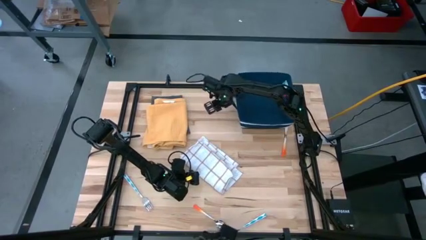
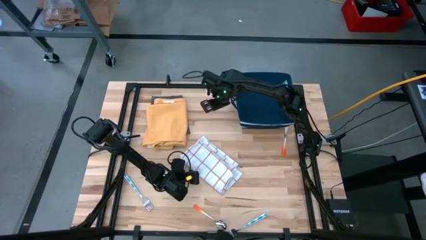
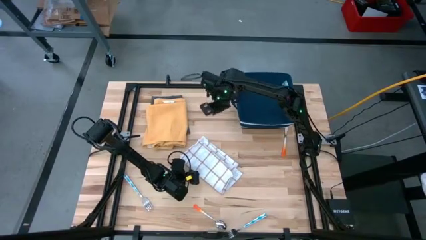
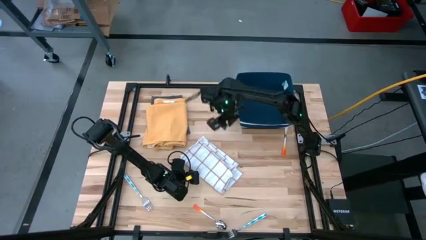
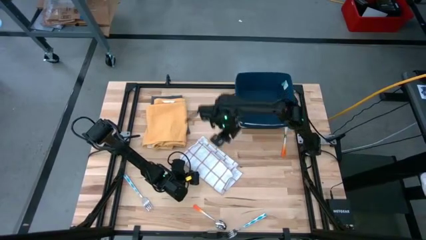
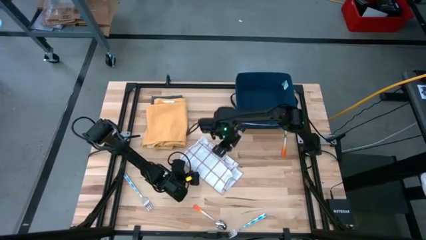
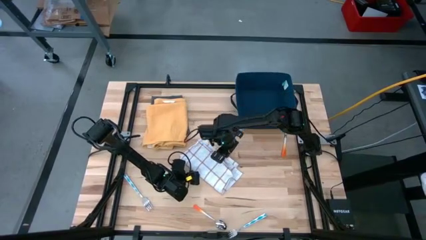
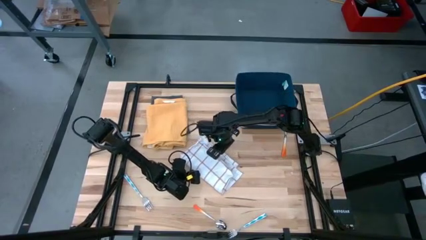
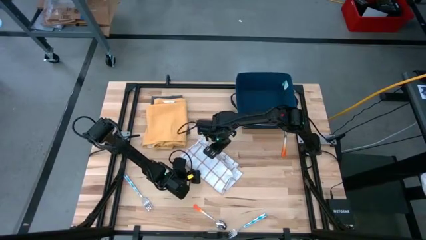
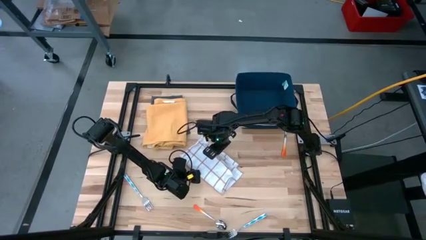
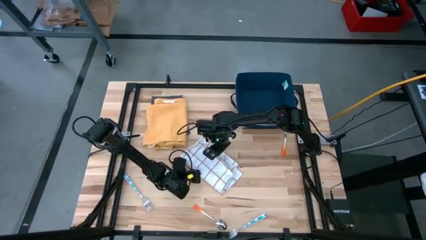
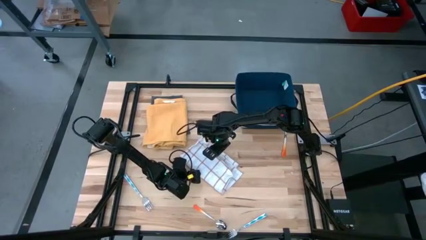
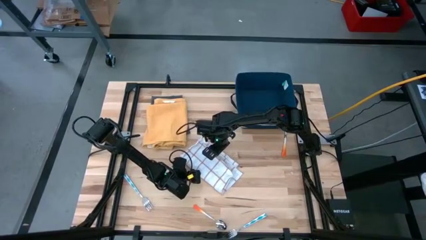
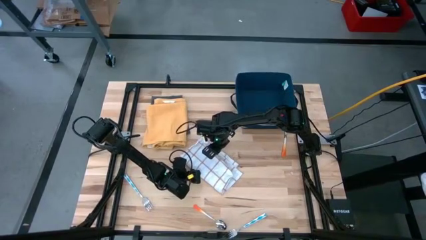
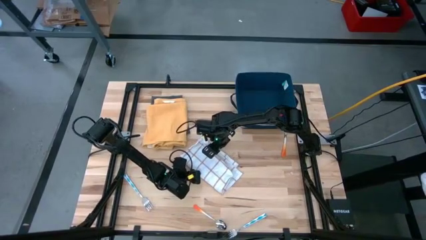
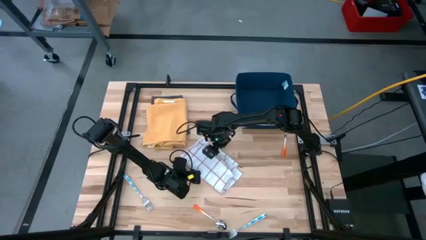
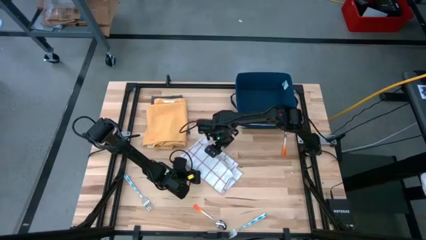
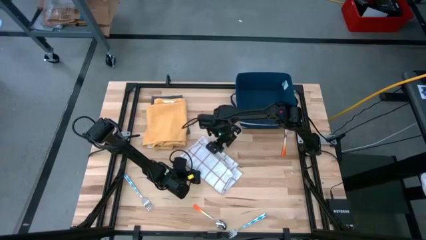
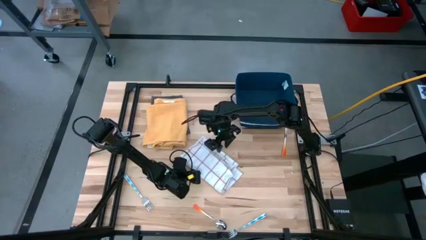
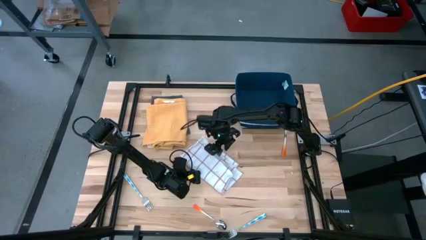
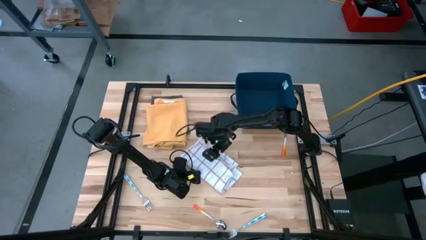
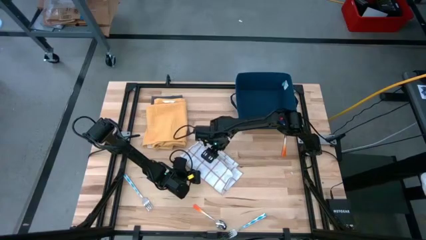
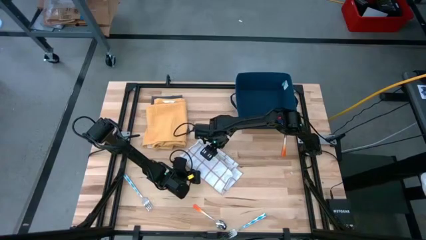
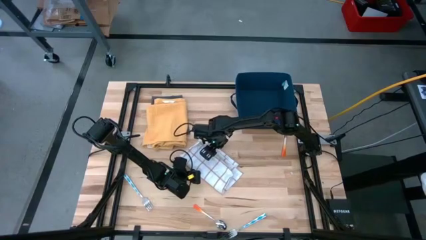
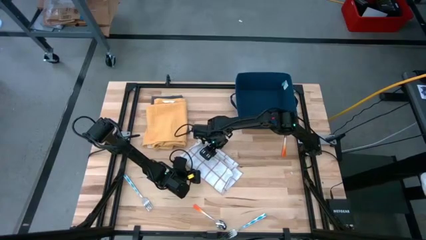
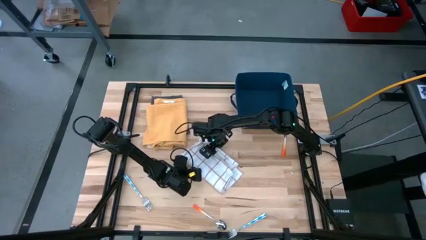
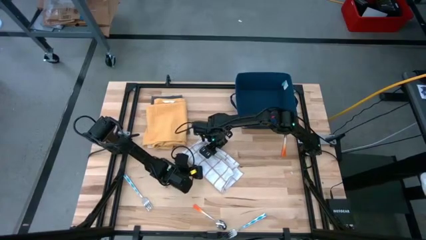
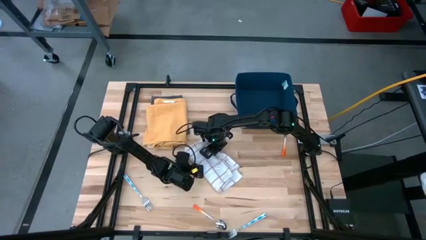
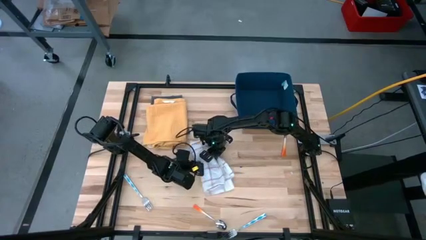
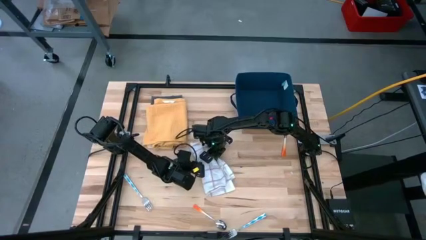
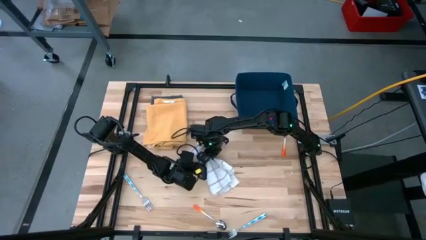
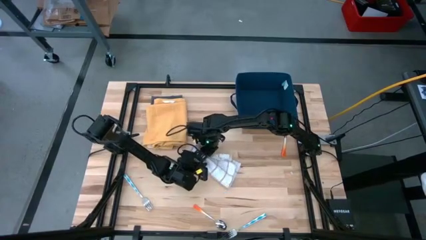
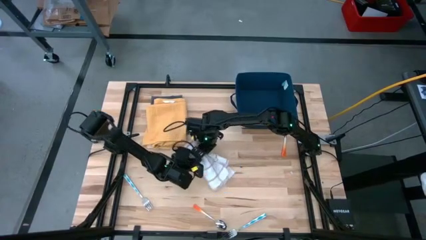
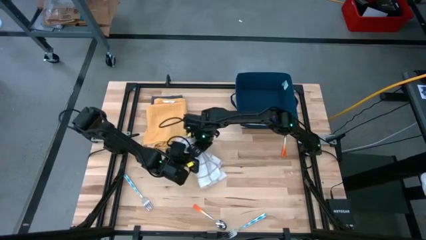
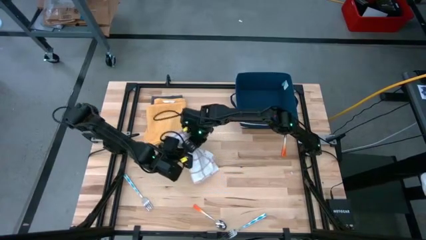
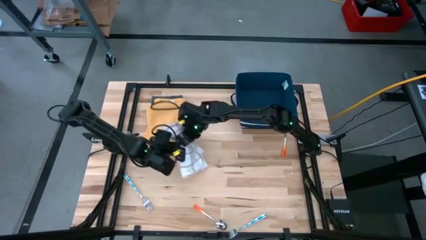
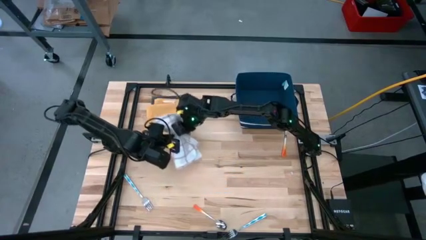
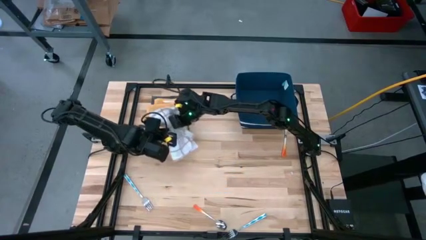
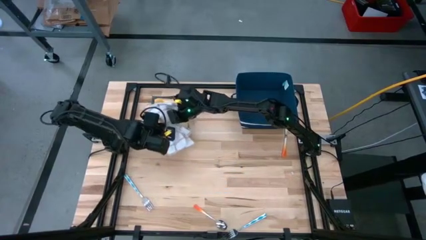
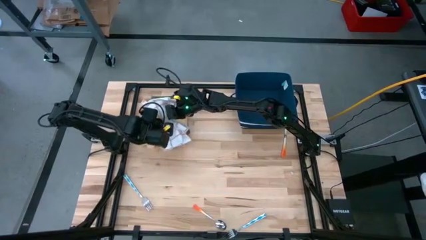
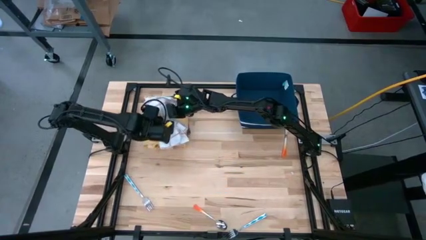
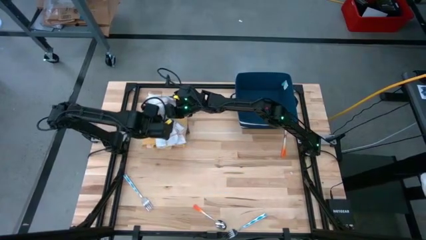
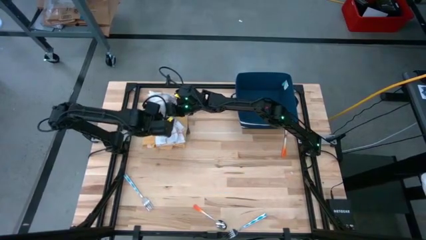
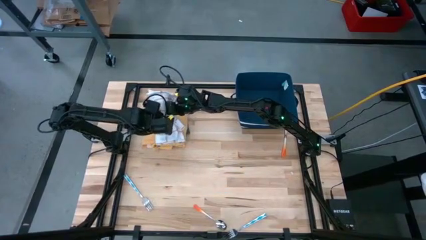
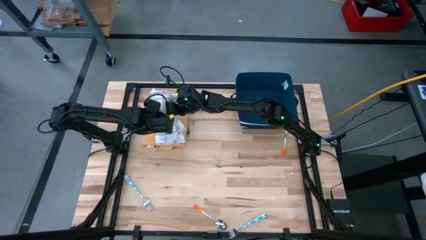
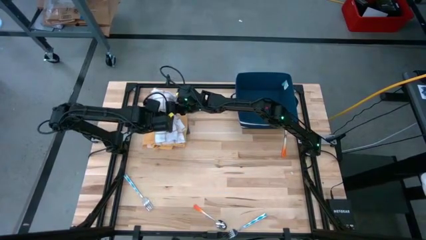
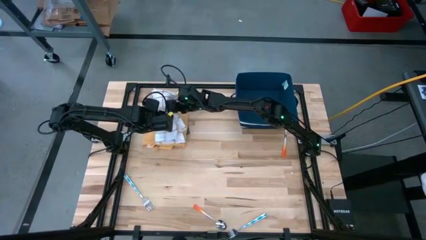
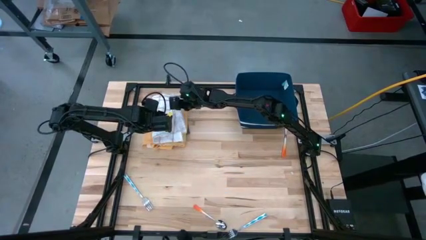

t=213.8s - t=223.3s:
Task: Fold towel
Stack the white towel into the yellow towel

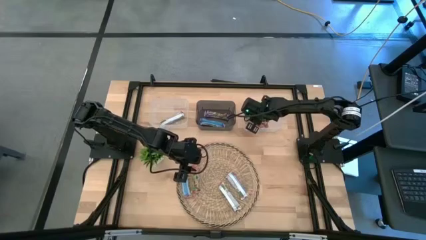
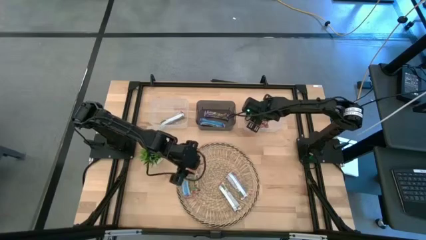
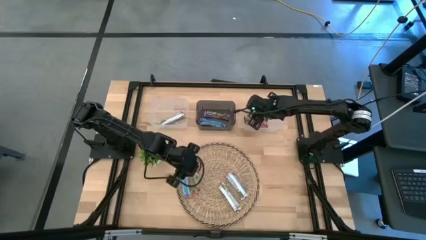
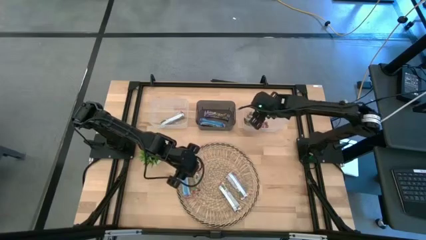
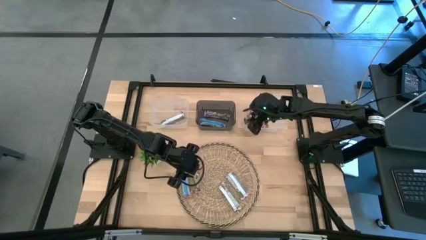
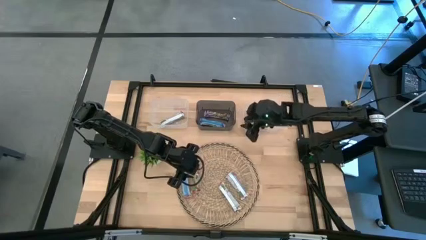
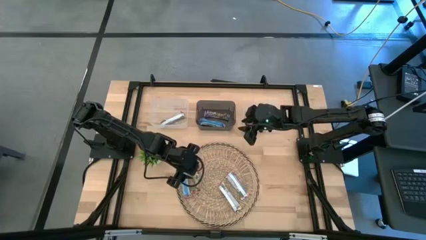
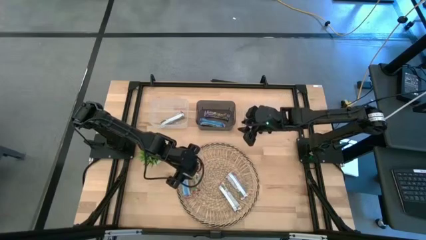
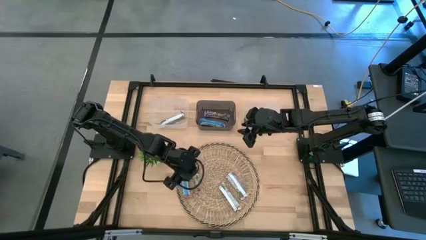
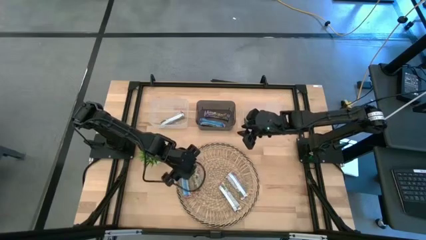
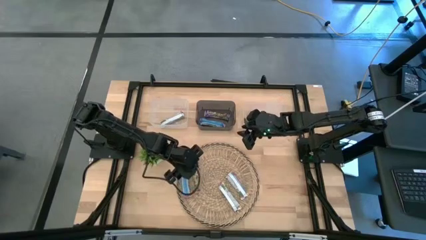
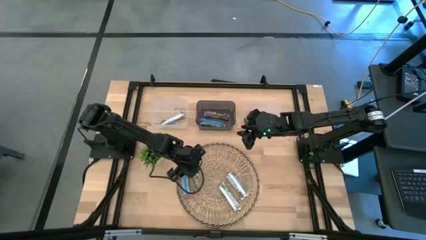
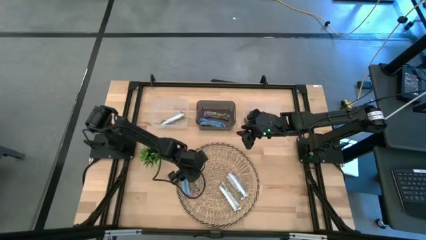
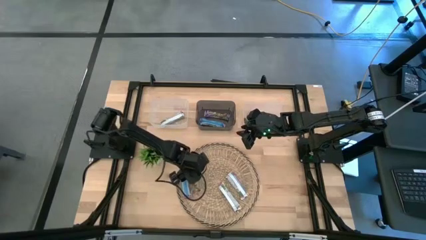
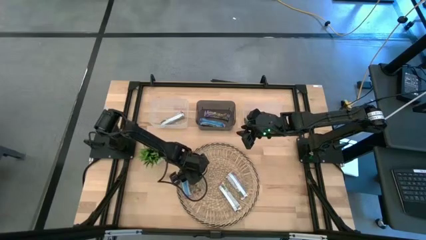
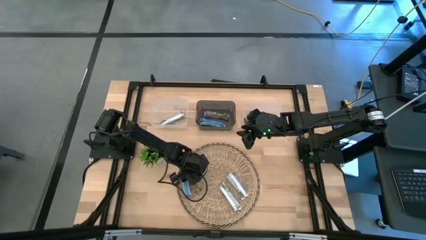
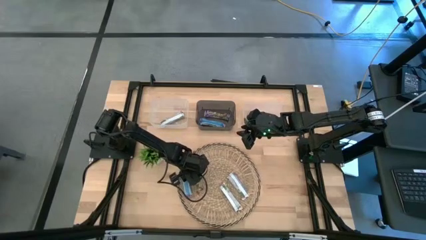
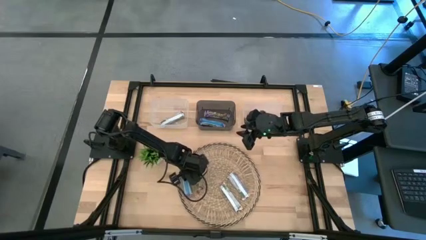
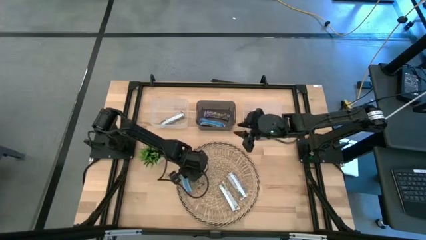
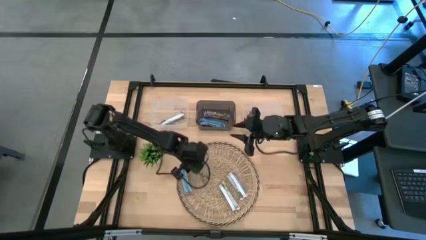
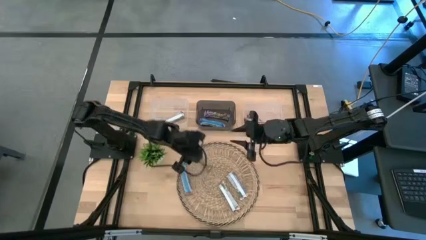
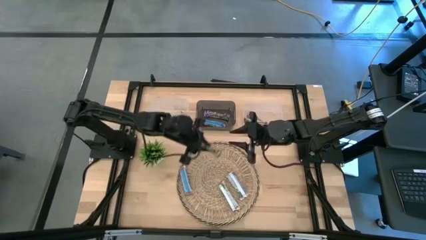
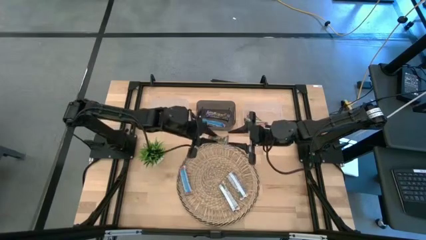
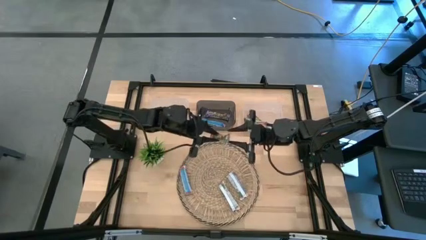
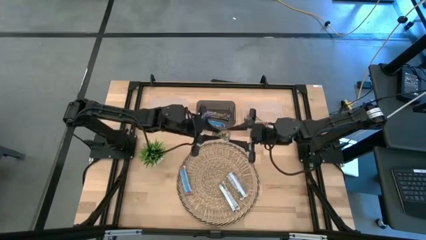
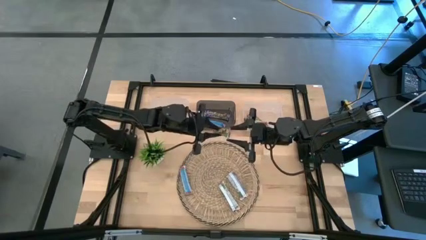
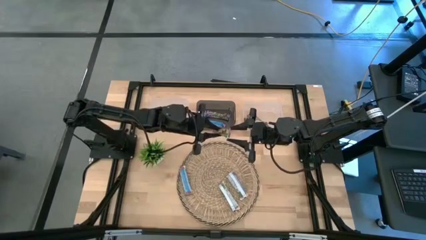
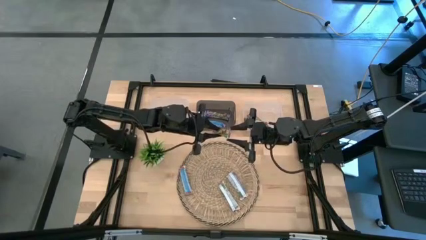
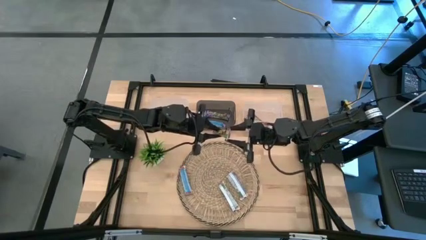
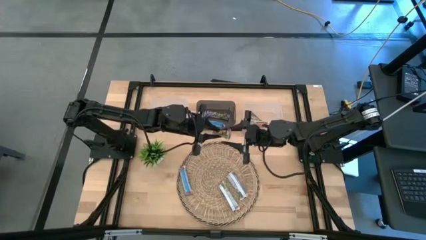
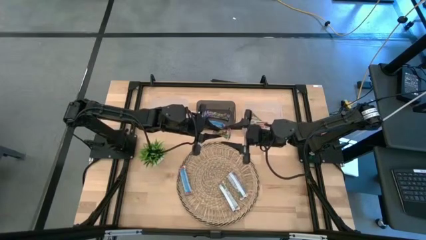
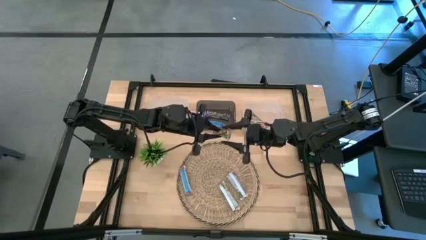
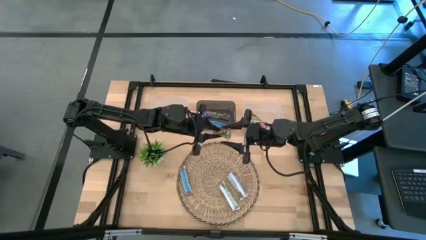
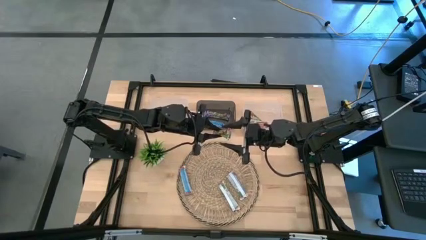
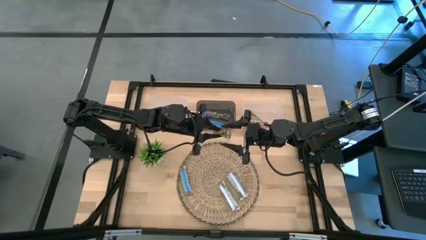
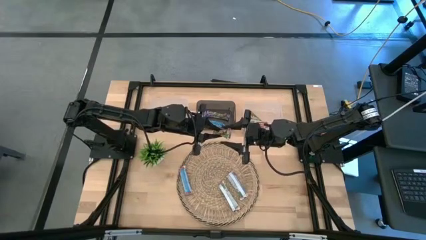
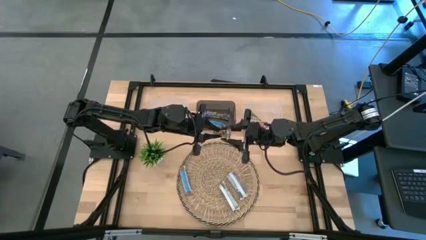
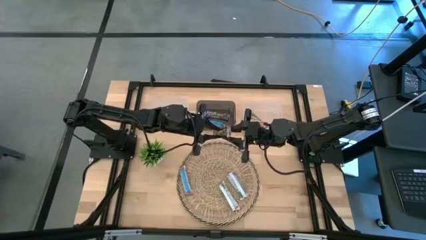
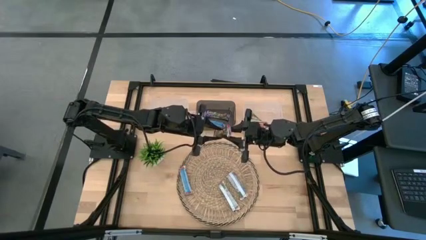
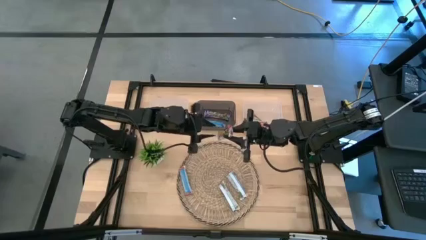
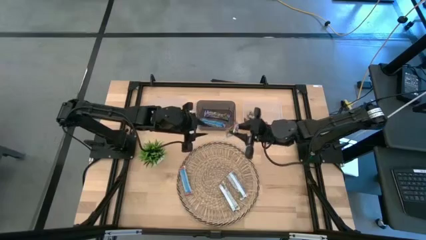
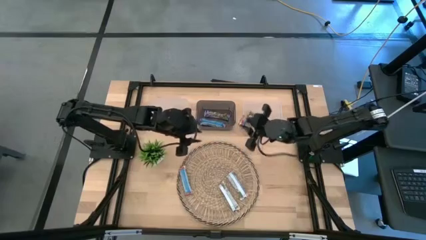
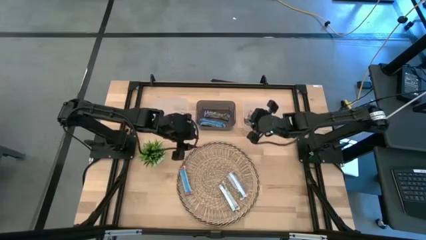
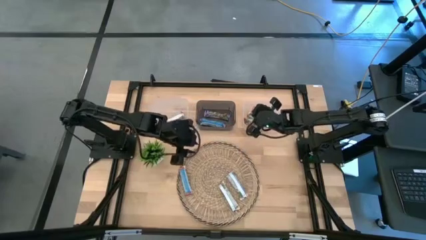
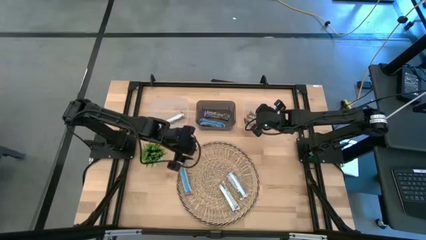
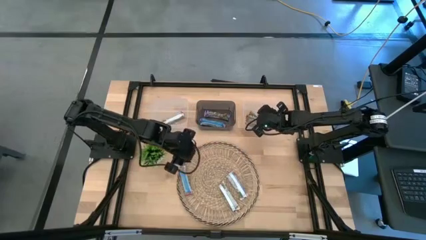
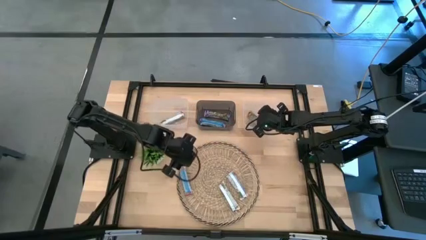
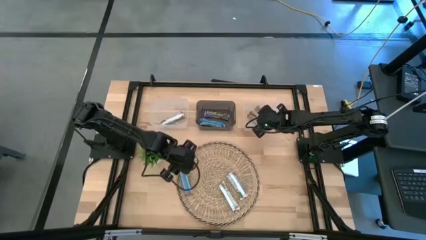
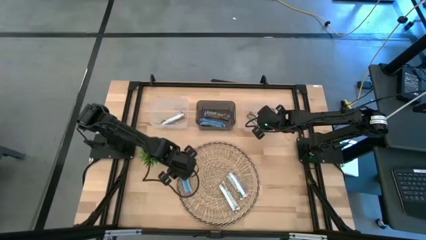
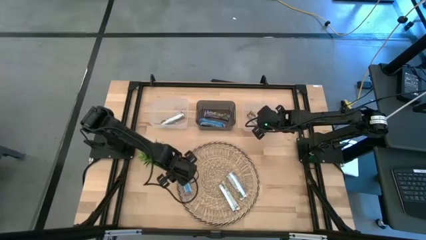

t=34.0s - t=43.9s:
Task: Pick and place Granola Bars by type
Put the red granola bar into the right transparent bin
